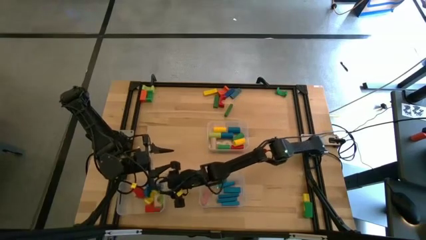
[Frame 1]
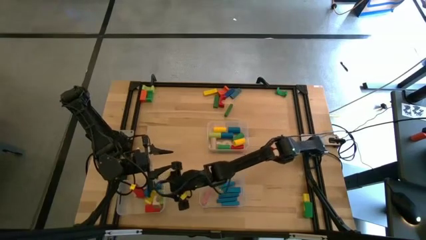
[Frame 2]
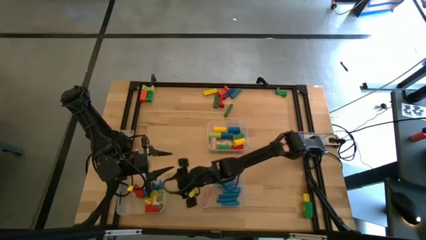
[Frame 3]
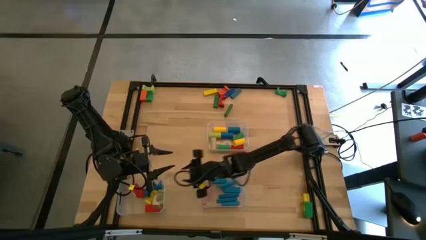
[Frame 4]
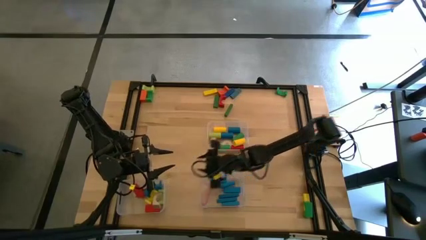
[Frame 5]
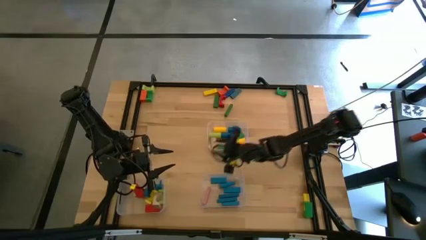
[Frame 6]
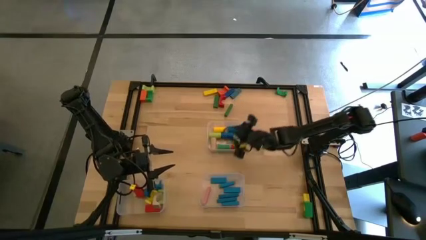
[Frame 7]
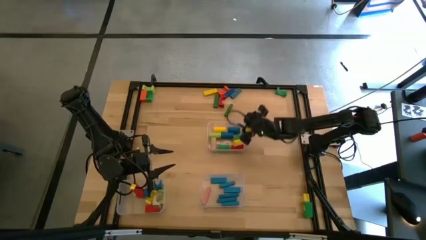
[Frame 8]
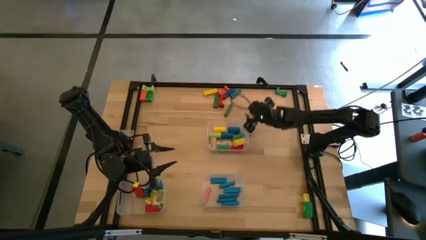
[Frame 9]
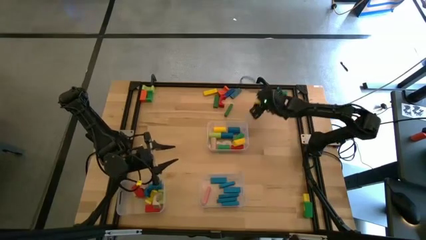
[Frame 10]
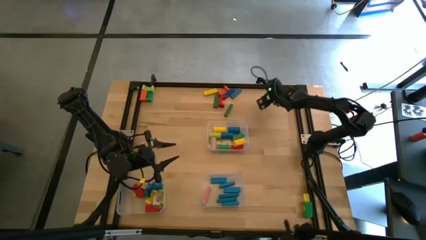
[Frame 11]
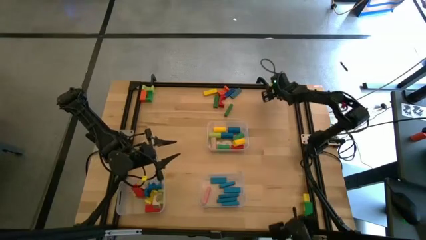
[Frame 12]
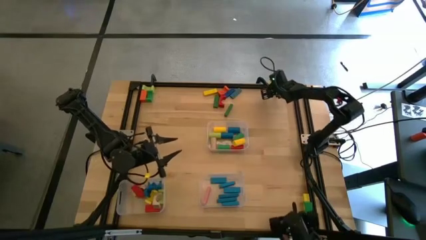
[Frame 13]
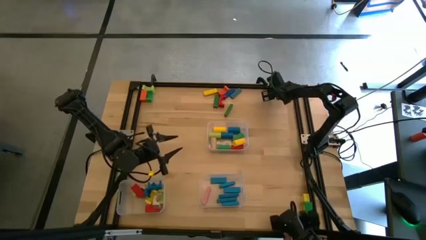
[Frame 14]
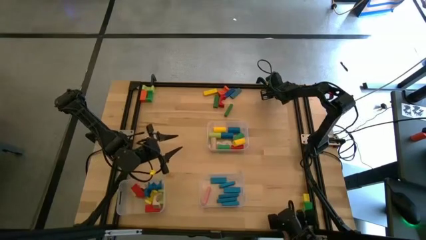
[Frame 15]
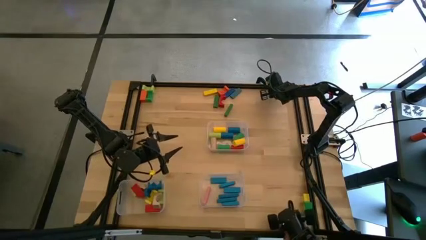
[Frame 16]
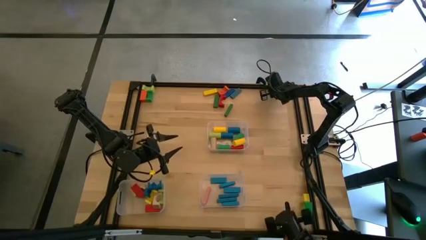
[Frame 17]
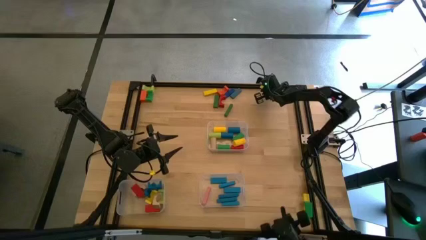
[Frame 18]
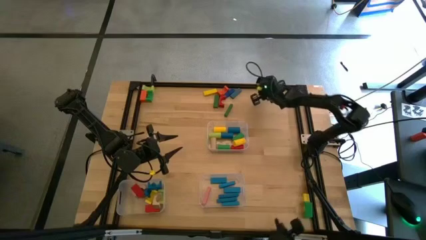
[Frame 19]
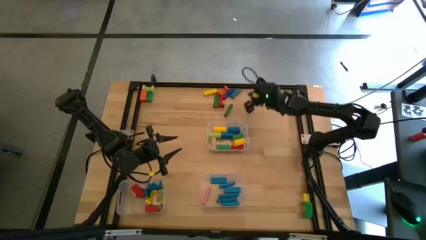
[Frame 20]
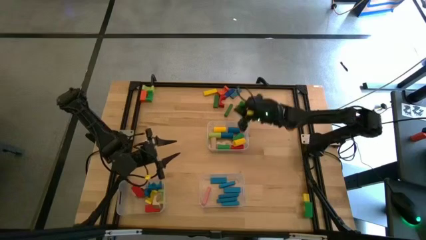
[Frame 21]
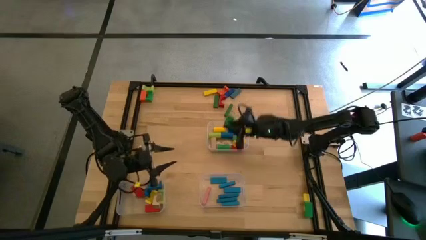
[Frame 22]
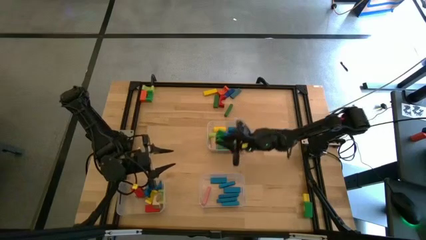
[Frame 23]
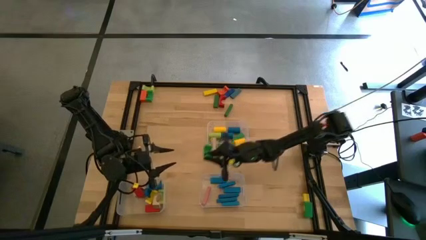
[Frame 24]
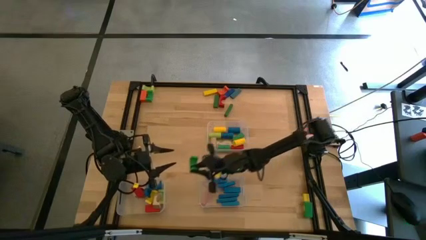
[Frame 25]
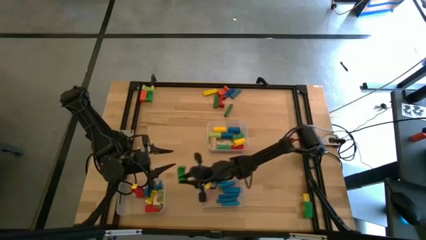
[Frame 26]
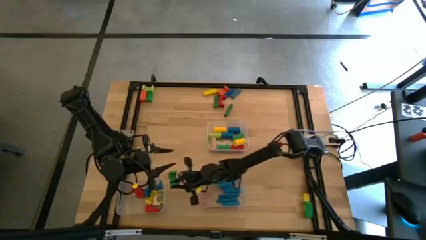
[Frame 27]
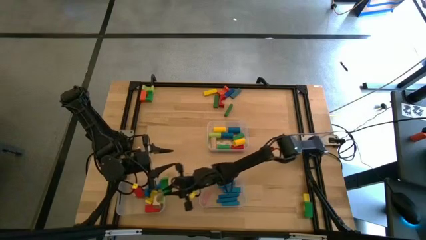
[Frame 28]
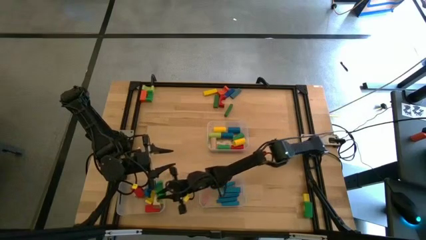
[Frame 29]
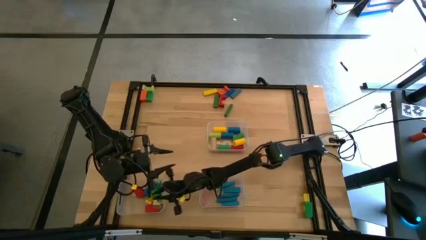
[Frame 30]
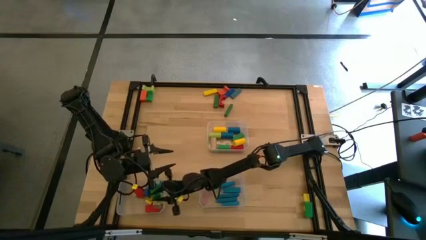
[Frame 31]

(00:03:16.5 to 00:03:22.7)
Task: Sort blocks by size
Put the green arch block into the bottom left transparent bin

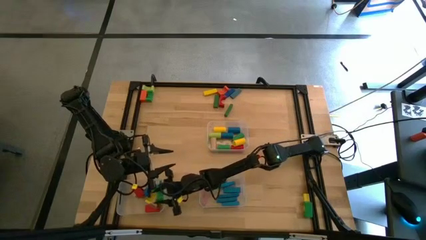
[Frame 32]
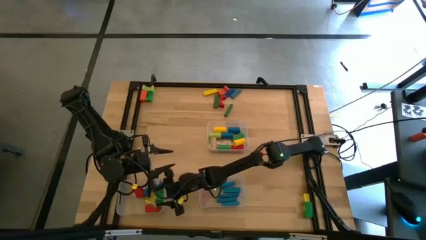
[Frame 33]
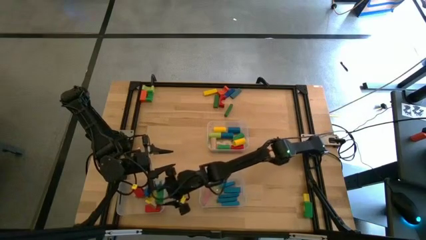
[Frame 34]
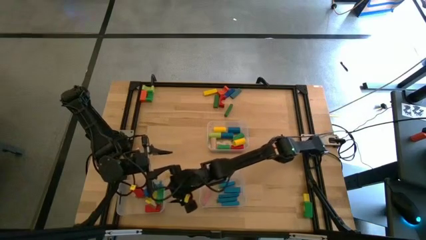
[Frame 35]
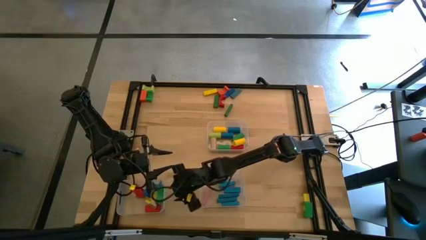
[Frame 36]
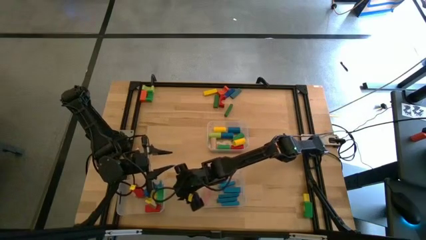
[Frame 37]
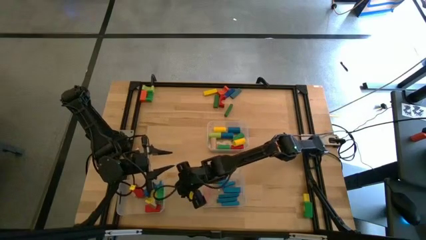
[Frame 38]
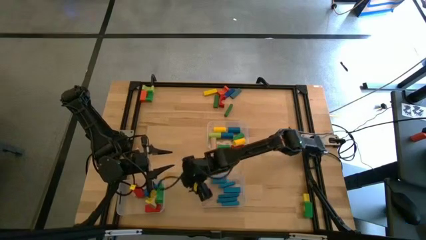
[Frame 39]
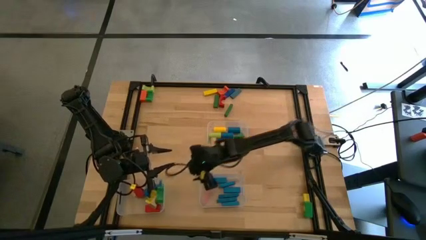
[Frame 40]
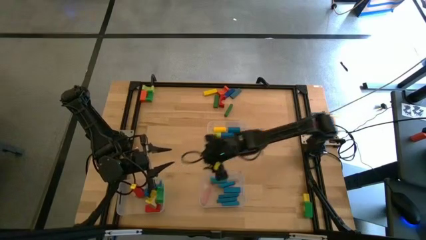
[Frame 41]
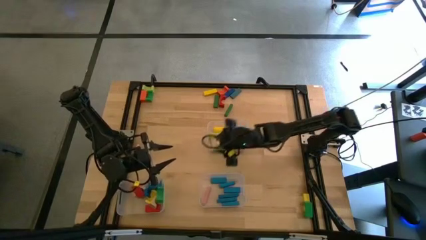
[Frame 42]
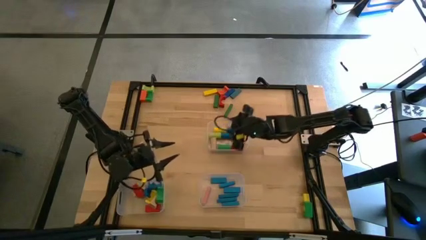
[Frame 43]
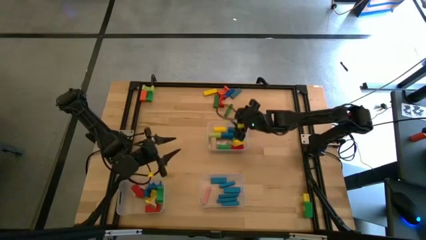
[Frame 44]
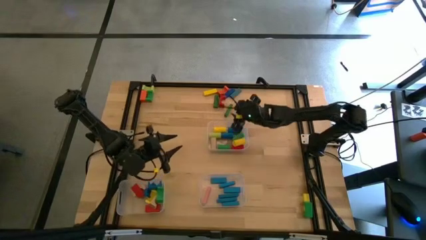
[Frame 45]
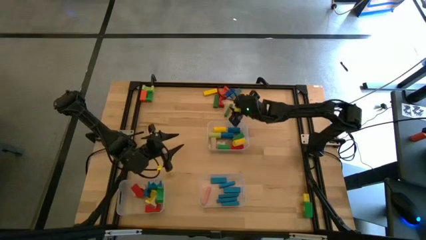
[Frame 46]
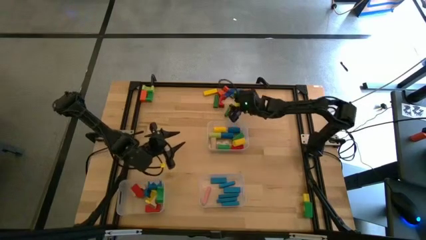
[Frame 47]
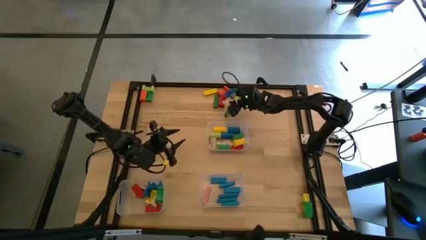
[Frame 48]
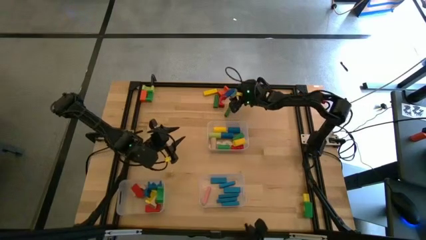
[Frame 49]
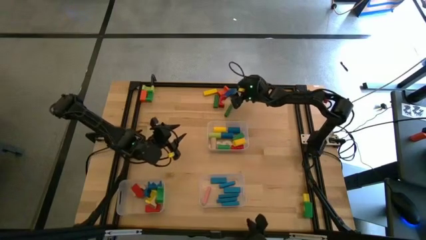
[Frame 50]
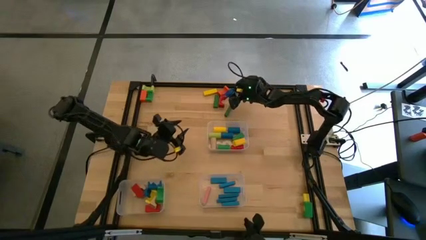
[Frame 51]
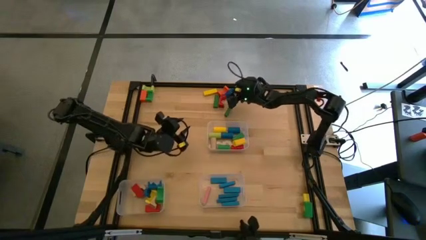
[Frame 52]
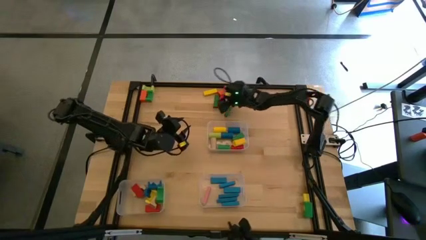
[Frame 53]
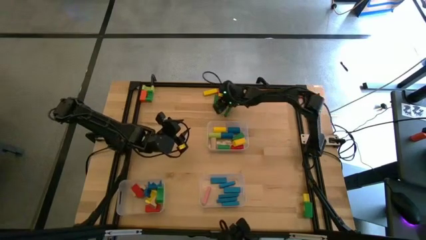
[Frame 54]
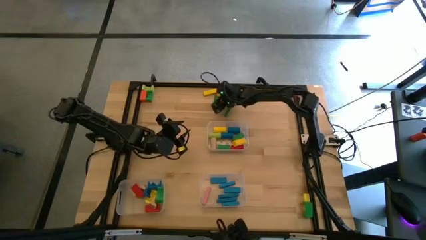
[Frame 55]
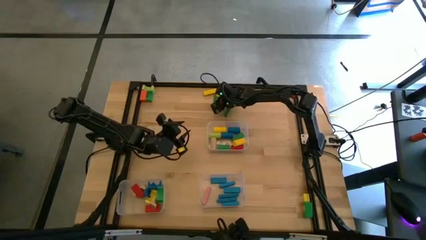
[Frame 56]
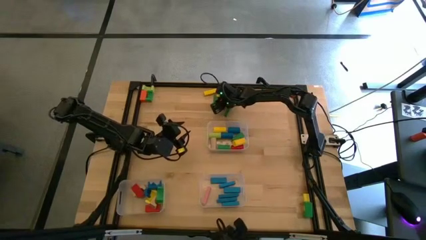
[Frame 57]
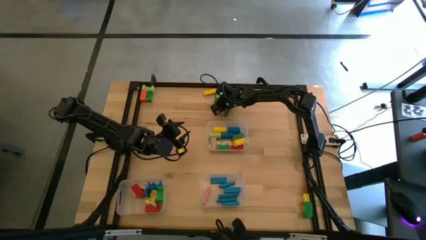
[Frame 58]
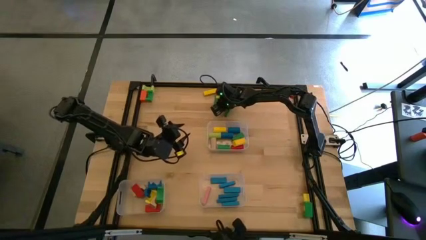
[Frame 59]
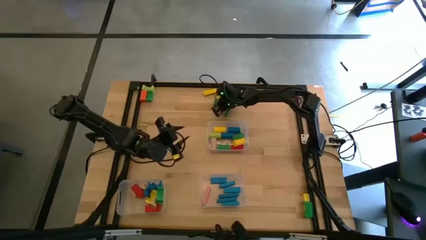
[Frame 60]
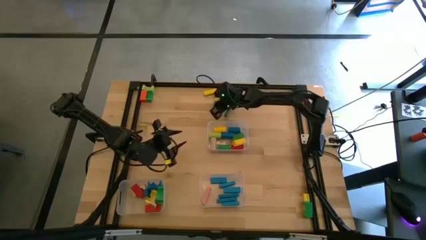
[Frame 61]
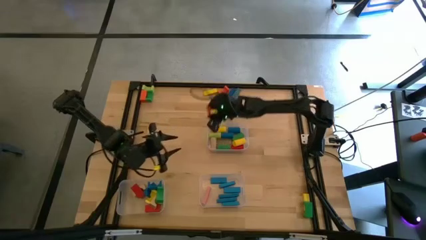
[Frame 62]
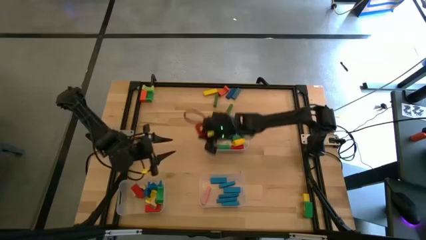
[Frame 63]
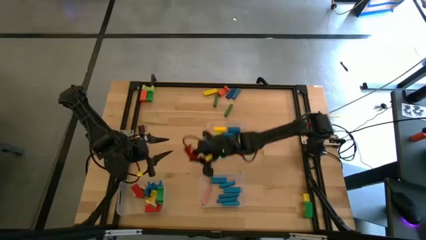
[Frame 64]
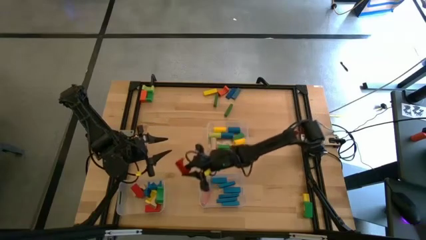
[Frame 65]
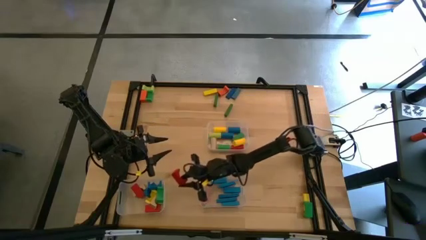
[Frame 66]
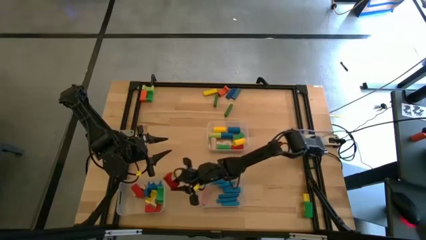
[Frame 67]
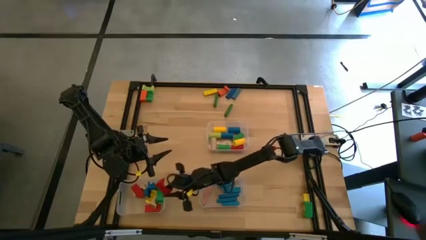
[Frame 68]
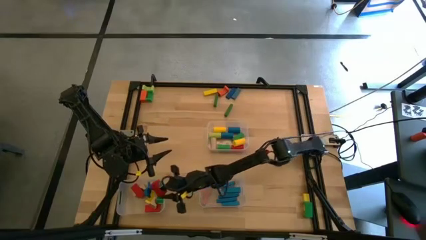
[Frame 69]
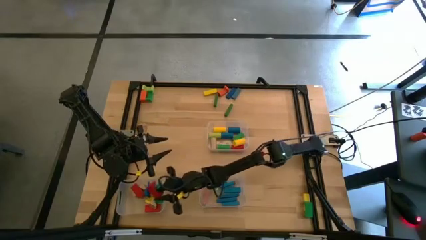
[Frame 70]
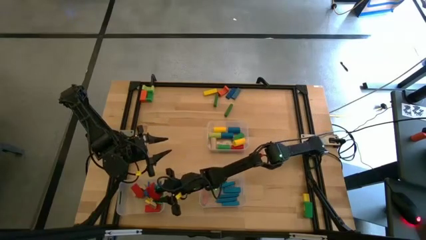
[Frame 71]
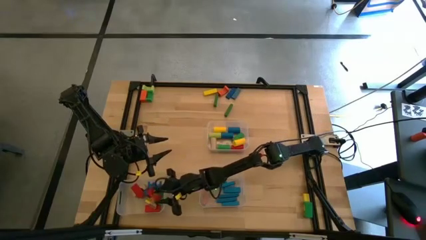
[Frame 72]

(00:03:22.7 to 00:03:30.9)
Put the red arch block into the bottom left transparent bin

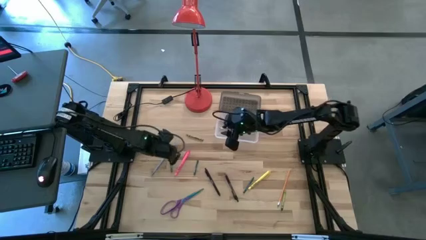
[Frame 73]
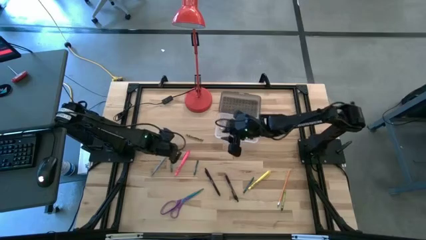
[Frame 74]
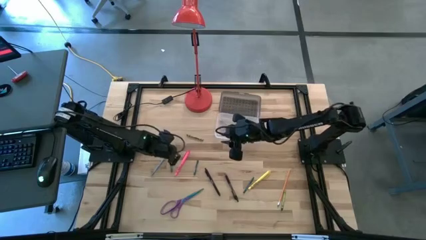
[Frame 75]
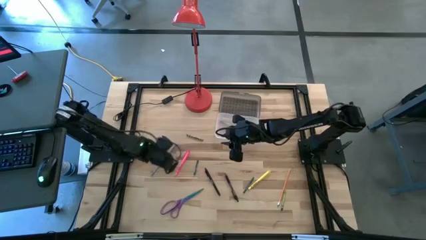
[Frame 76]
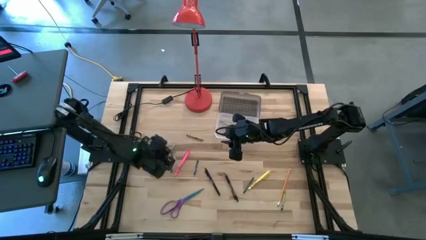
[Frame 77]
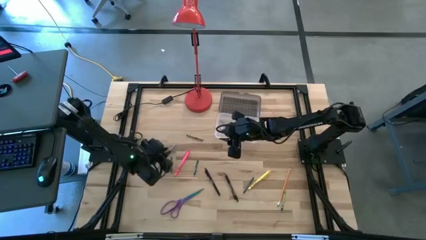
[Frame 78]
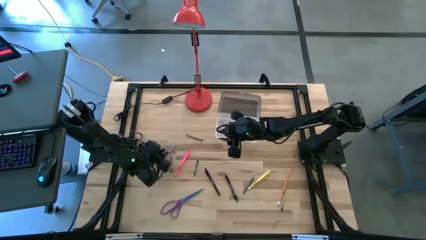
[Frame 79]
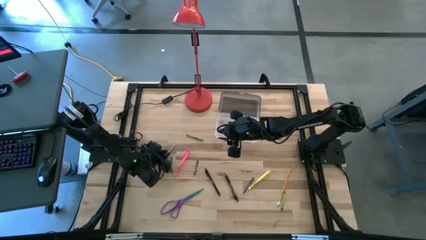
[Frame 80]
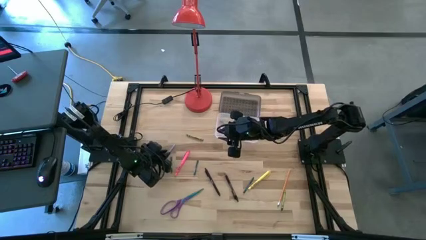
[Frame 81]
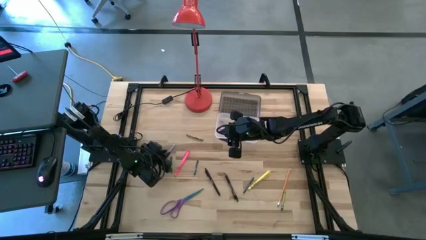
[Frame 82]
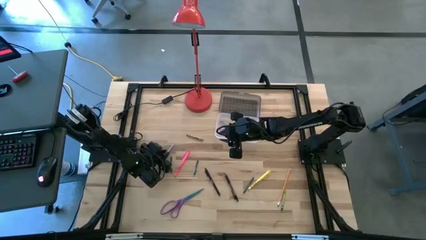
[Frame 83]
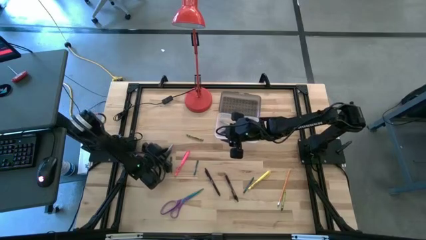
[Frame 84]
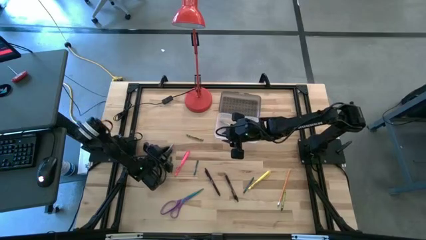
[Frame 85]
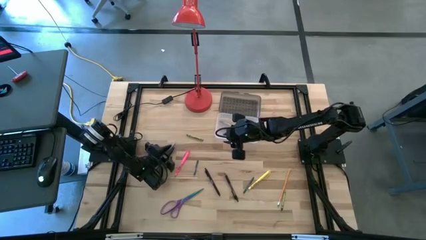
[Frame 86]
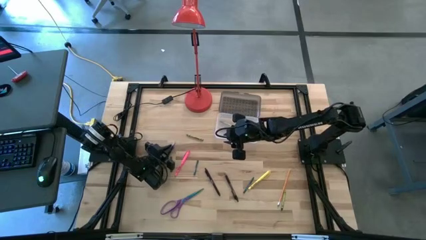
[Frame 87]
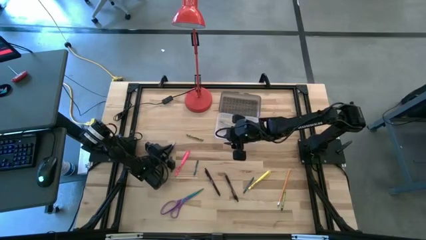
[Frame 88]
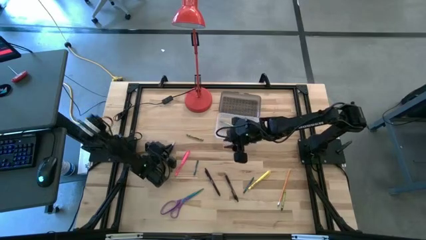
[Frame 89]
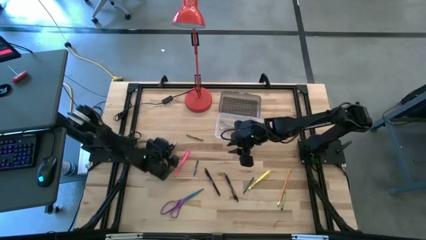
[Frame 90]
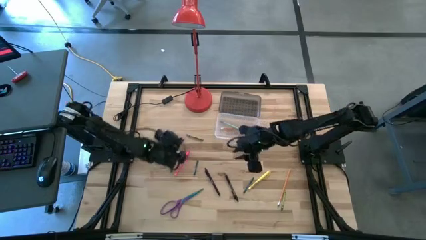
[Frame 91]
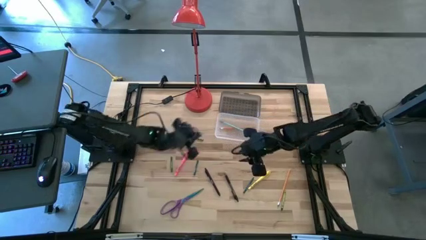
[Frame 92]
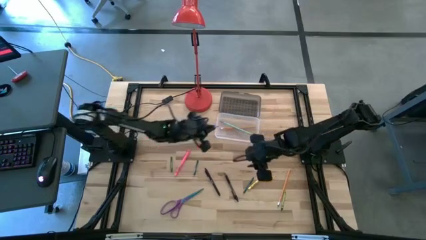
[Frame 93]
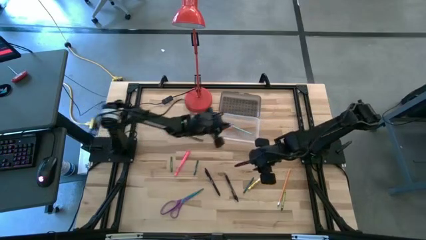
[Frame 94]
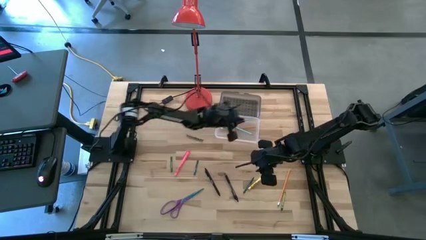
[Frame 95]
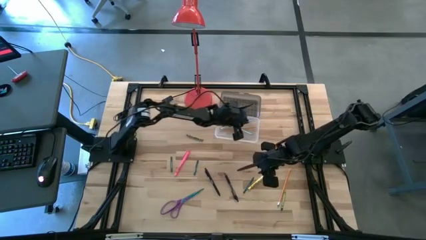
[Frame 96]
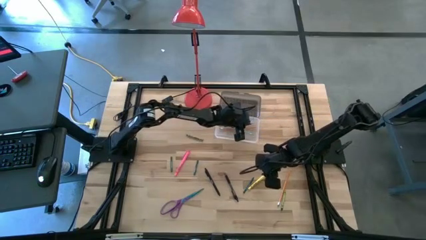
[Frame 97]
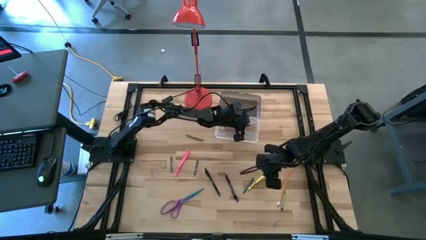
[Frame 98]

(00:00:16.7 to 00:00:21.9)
Task: Pick & place school supplies into a supply box
Put the blue pencil into the black supply box
